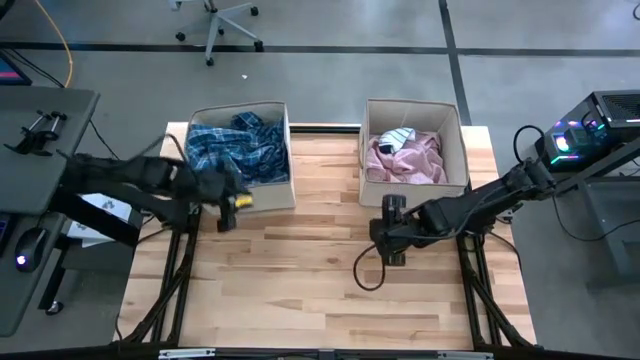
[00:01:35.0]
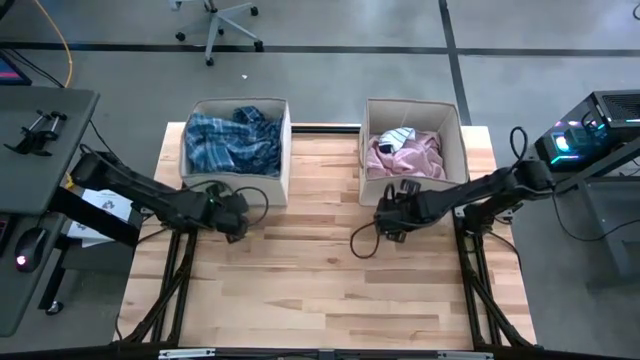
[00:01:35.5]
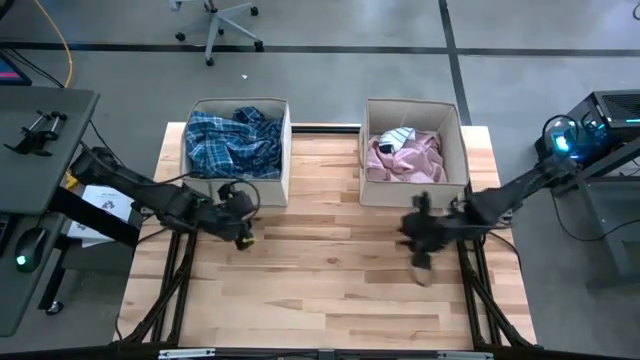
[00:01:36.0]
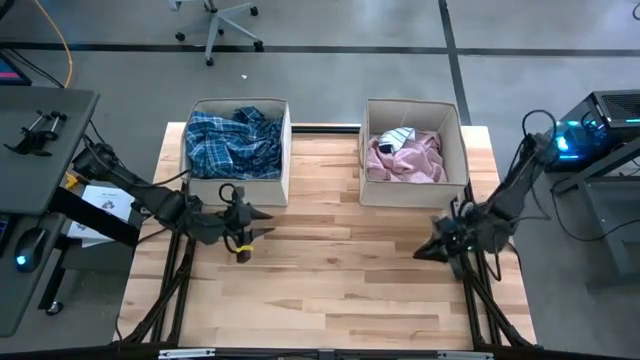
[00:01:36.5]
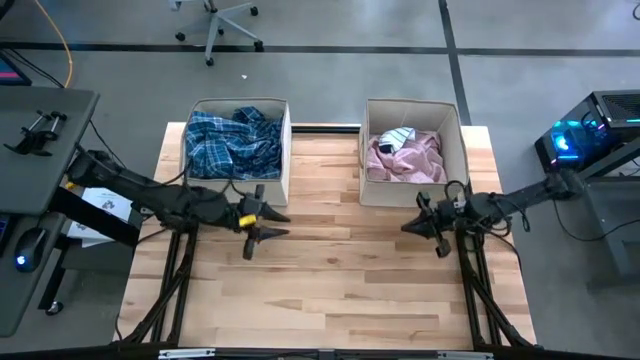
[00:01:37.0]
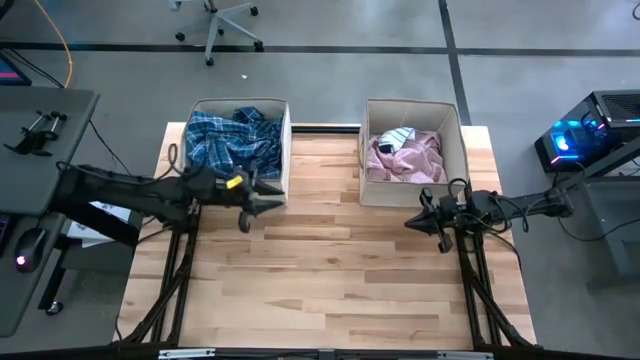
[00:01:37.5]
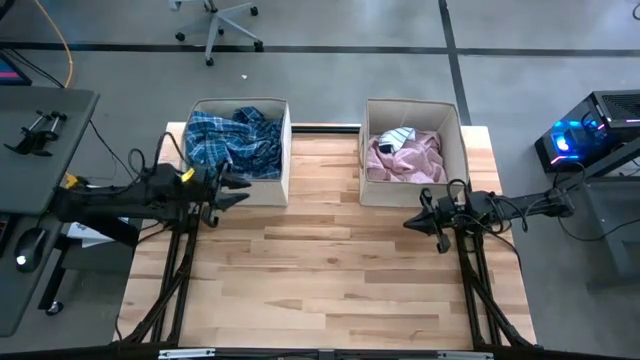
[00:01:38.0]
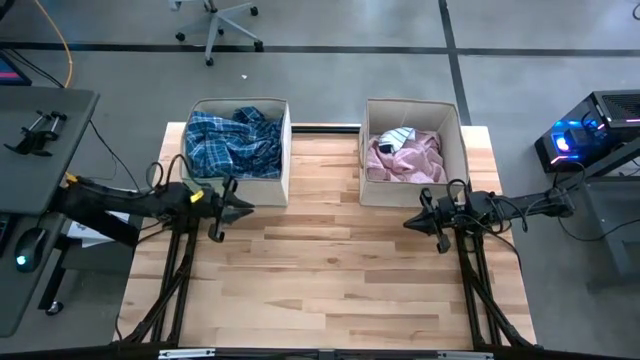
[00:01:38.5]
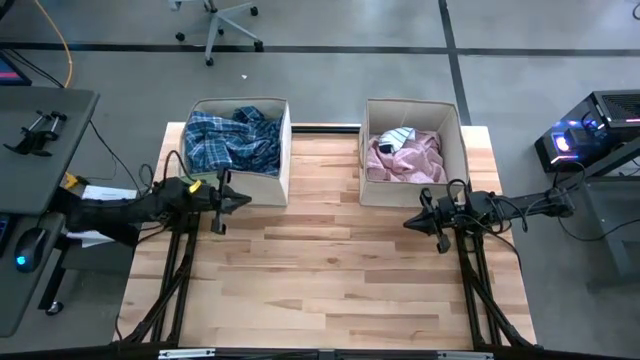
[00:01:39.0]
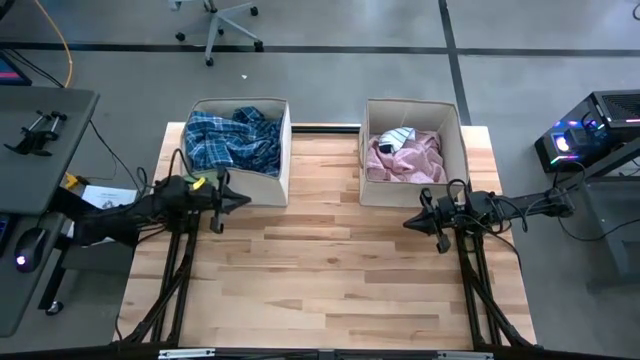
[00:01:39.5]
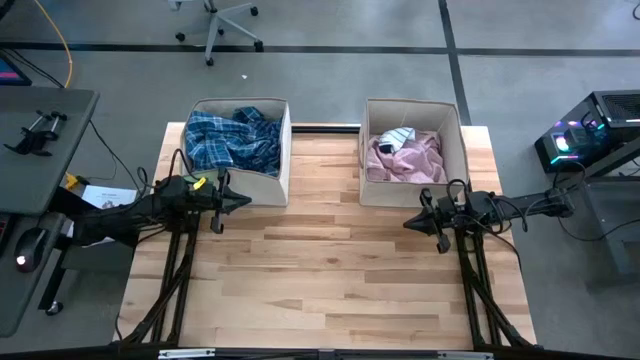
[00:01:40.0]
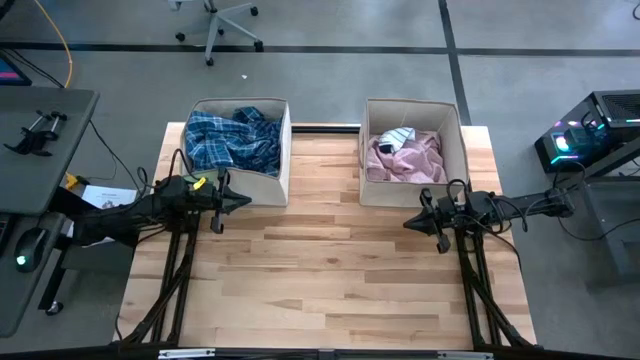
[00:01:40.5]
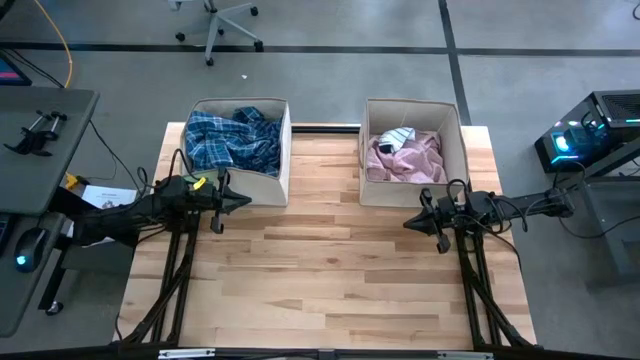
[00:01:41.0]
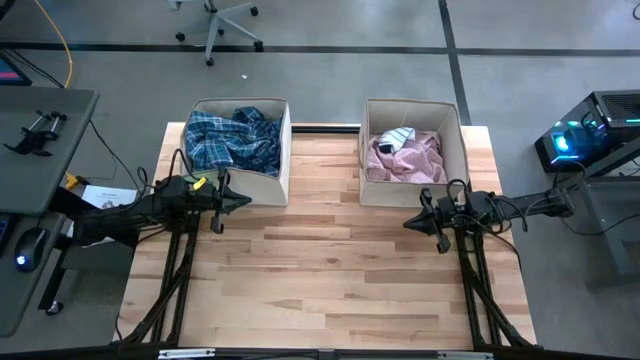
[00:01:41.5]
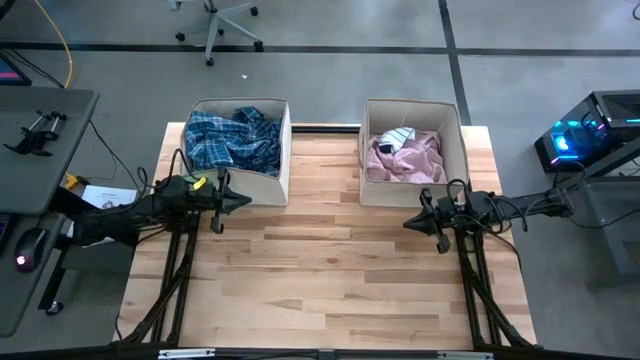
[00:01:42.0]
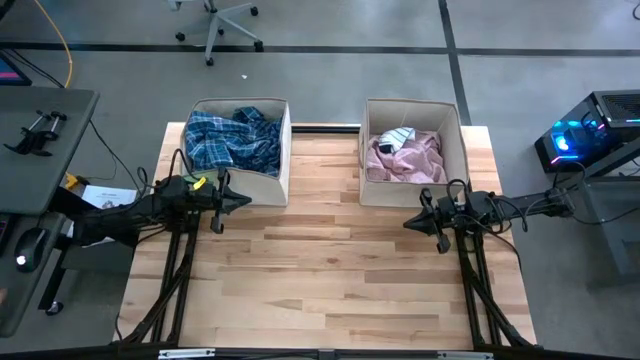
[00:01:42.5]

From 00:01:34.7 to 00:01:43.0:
Task: Sort clothes
Return to Home Position

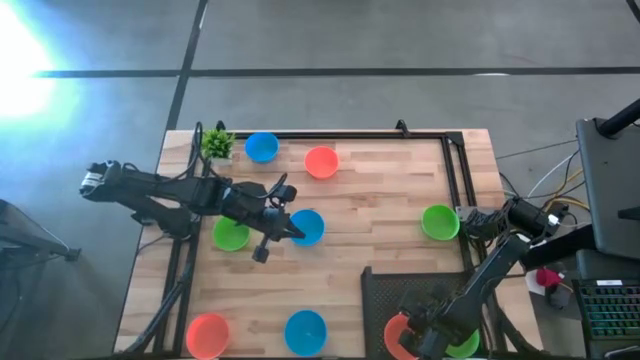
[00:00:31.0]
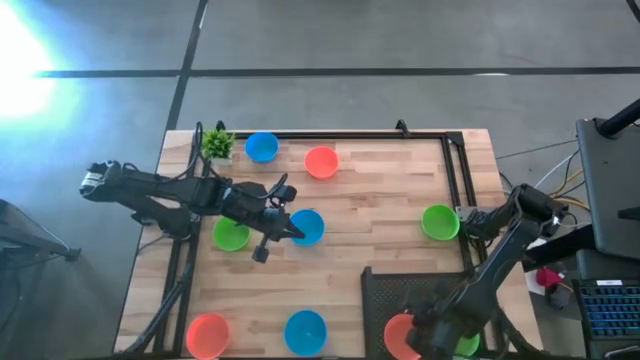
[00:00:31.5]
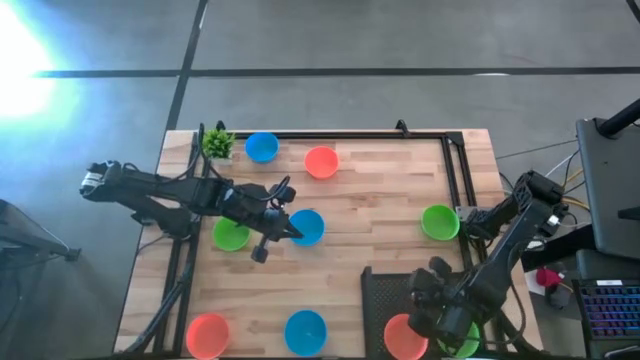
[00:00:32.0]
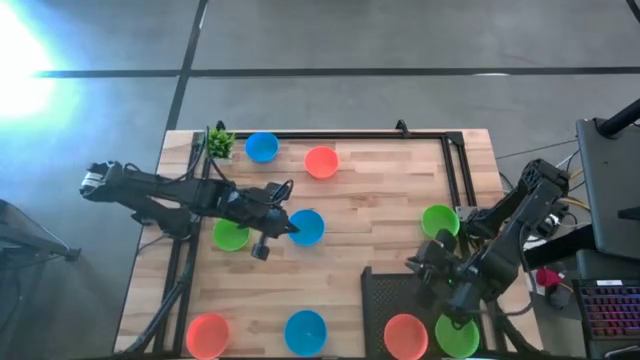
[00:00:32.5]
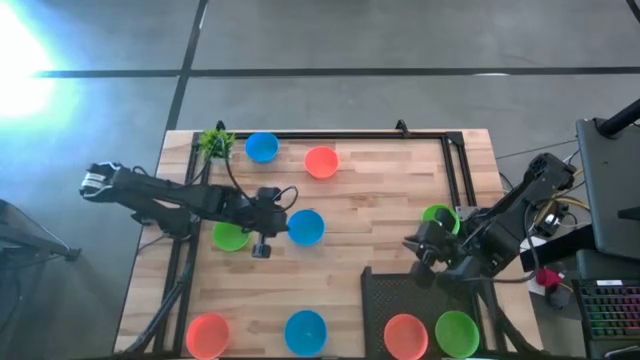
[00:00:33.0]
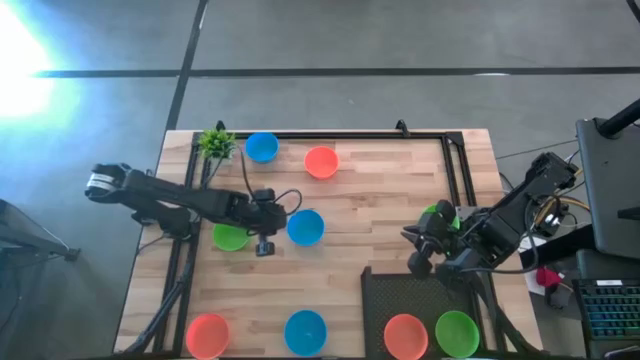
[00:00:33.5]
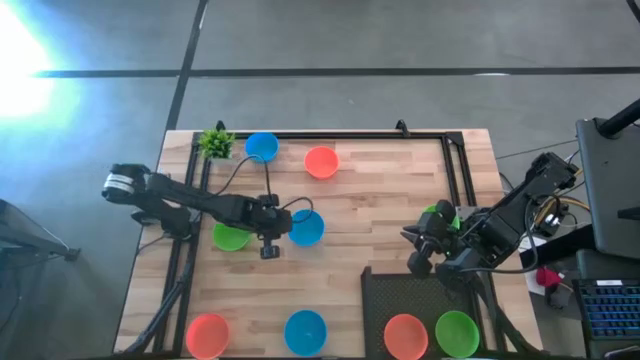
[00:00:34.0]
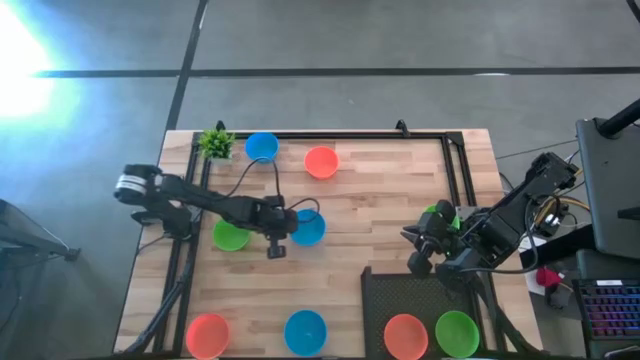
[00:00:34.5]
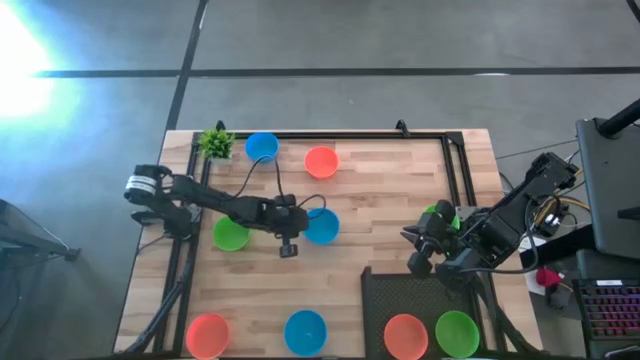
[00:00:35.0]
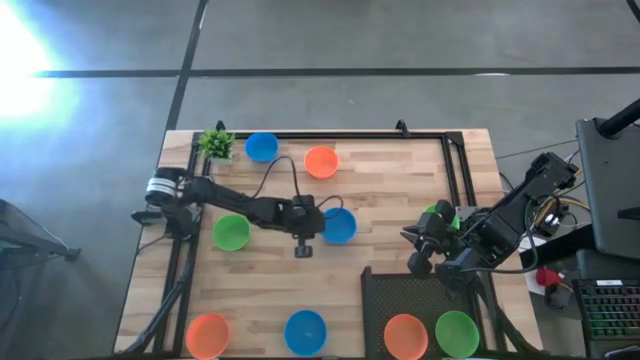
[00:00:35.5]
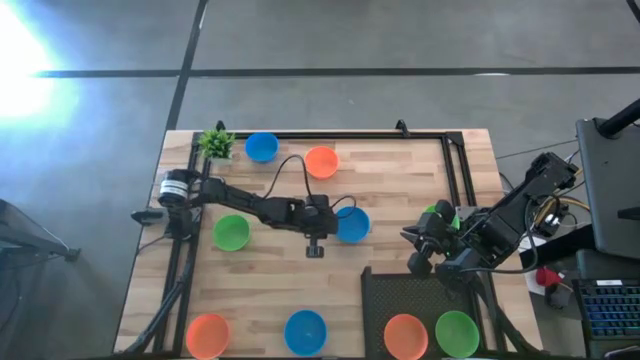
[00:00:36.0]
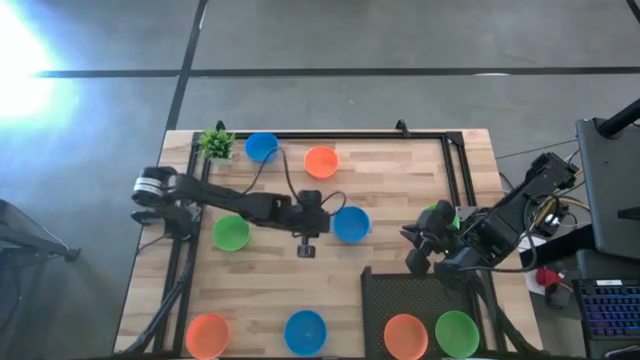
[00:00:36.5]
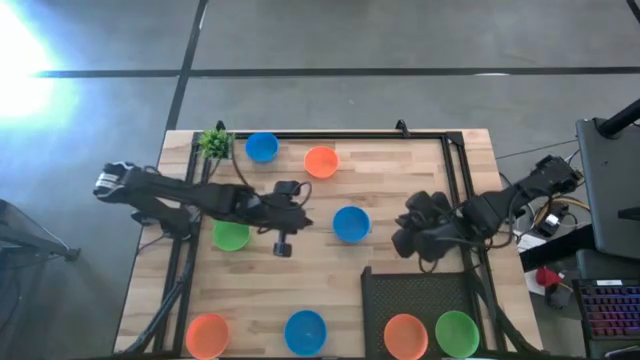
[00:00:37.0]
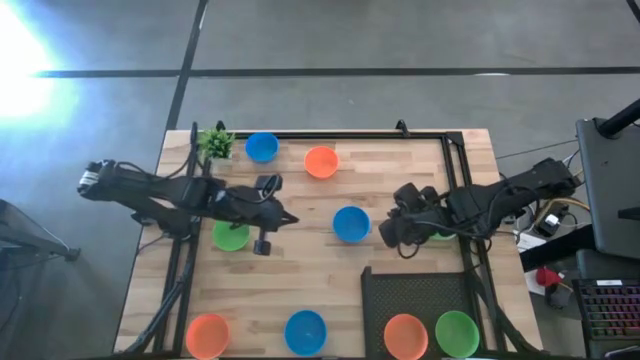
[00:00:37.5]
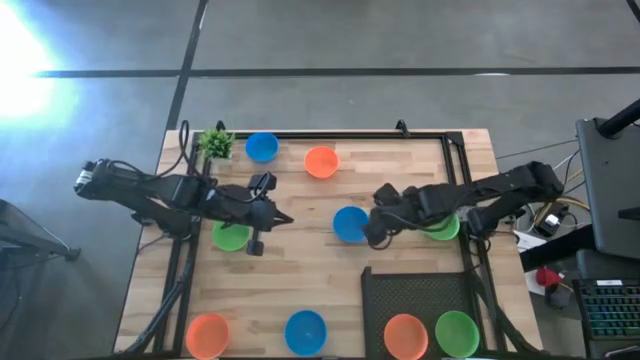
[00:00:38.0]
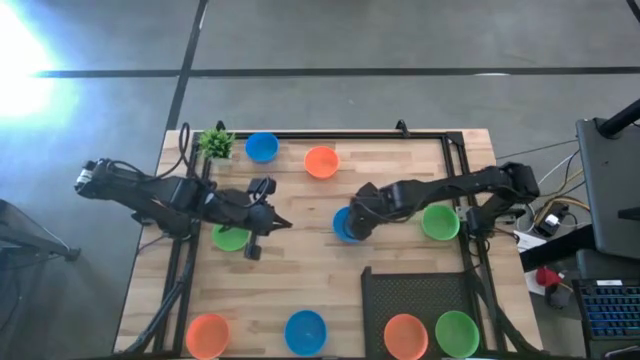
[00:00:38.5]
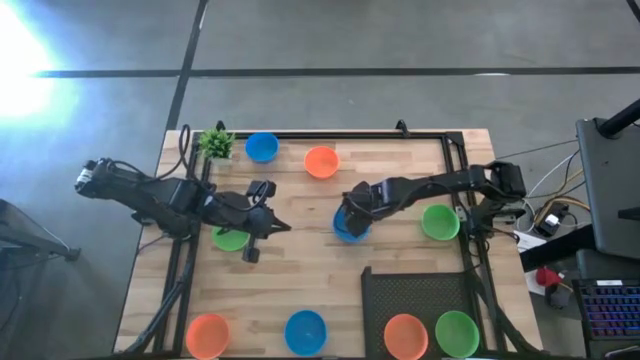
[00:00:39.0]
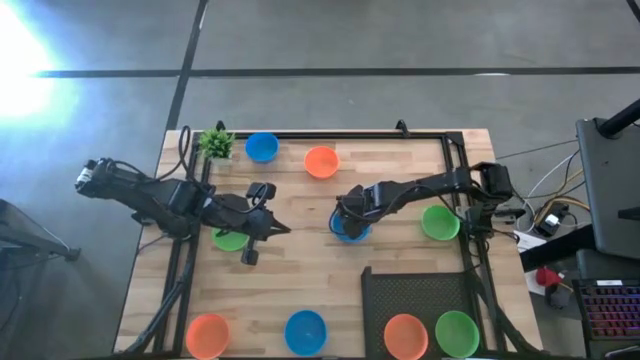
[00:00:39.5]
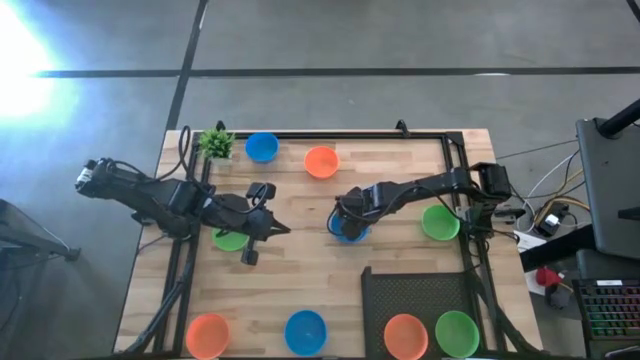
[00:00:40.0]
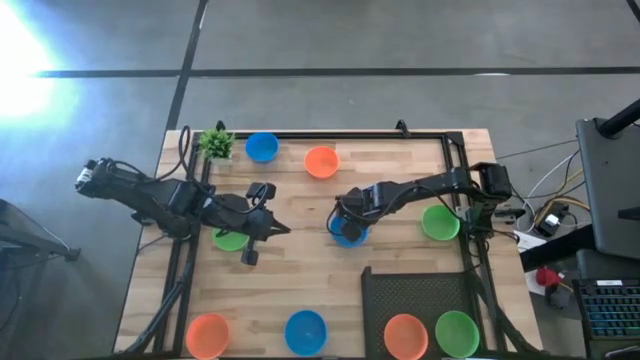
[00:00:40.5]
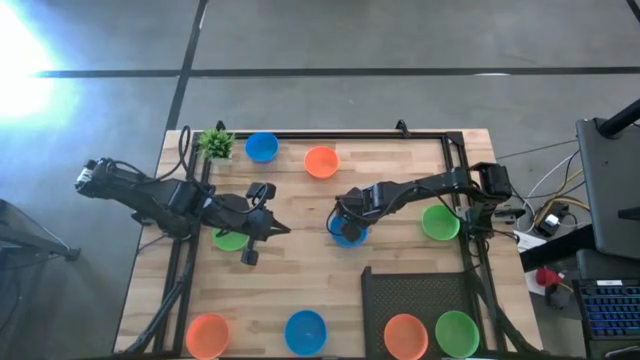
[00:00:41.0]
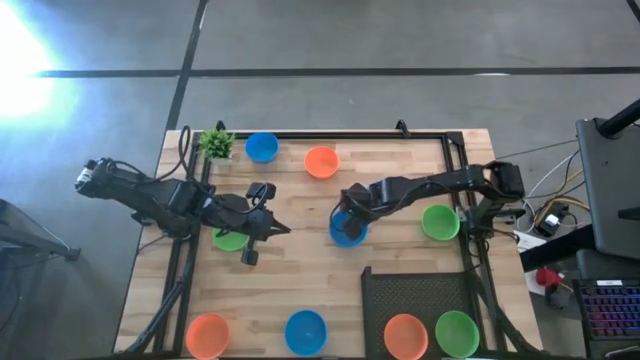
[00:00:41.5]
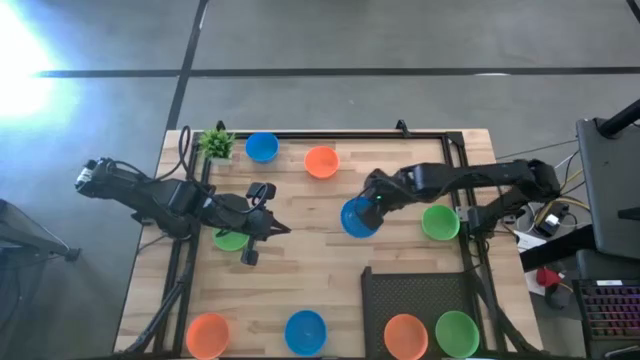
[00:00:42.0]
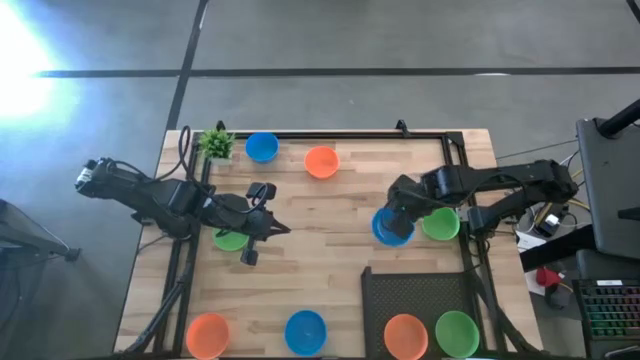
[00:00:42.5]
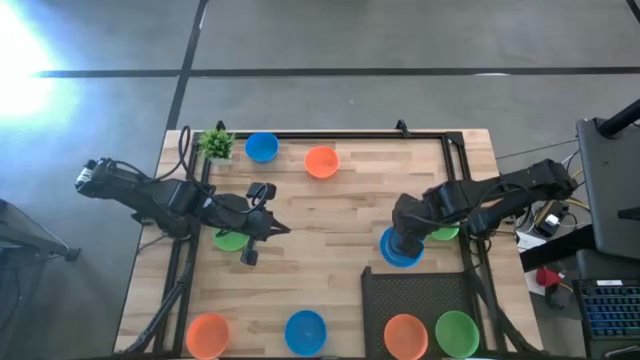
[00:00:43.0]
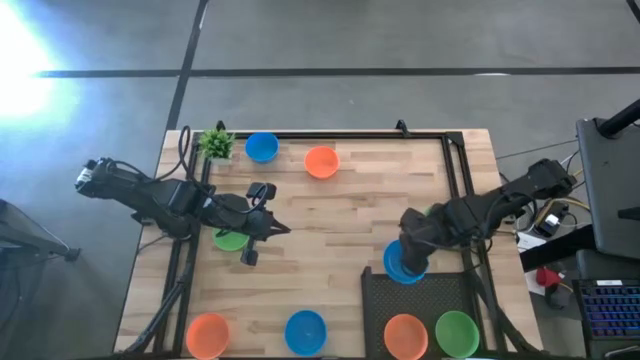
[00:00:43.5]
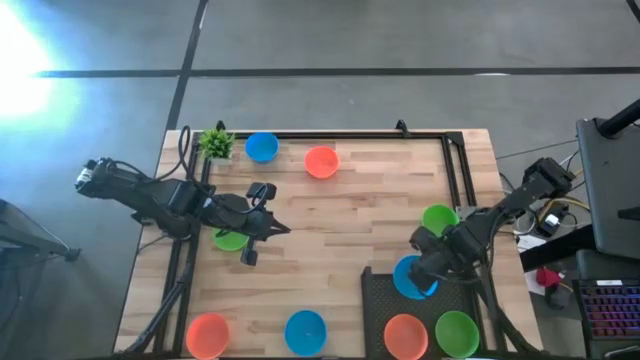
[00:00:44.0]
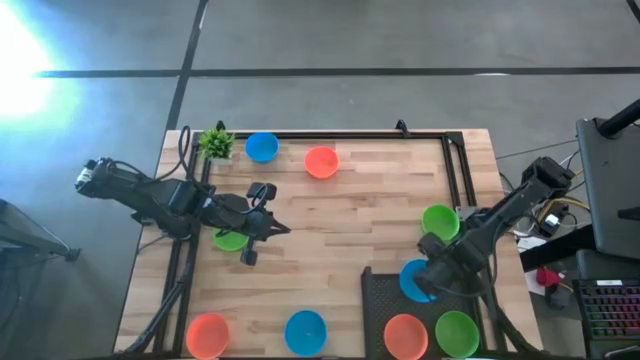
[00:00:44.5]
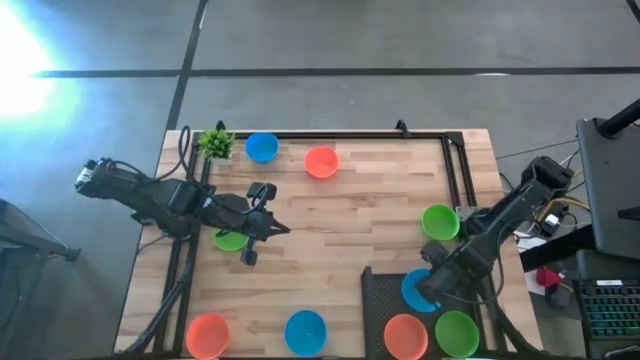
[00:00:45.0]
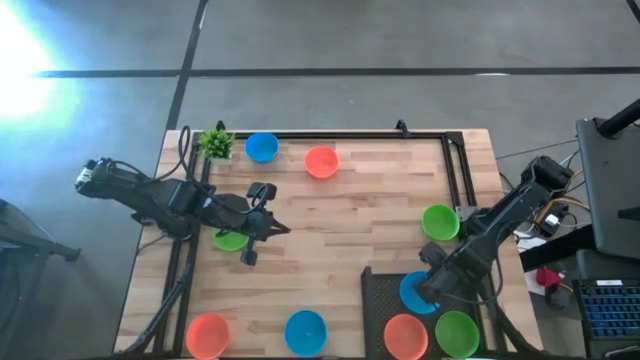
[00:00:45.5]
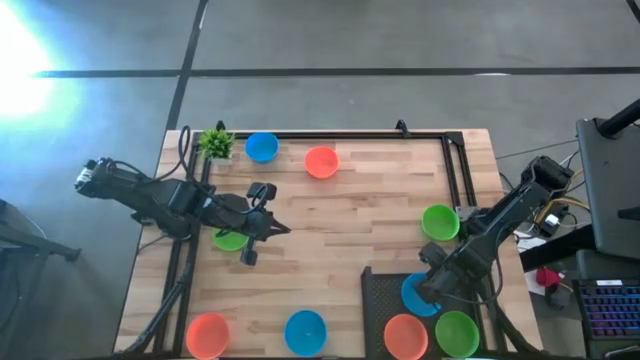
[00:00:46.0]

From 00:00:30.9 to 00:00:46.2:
Task: Pick & Place Mini bowls
Put the middle blue bowl on the shelf
